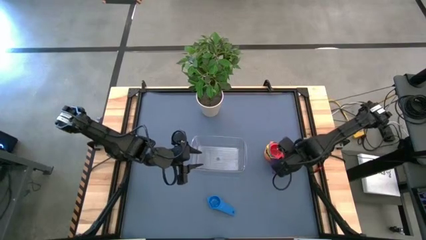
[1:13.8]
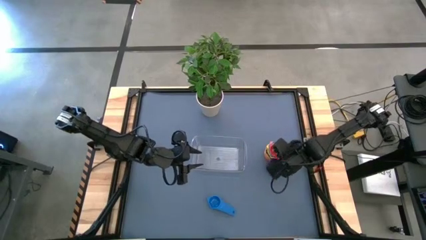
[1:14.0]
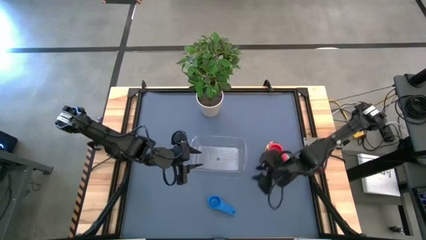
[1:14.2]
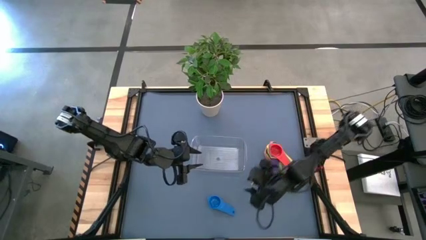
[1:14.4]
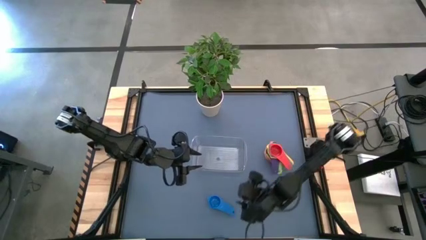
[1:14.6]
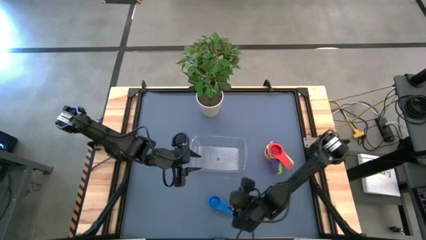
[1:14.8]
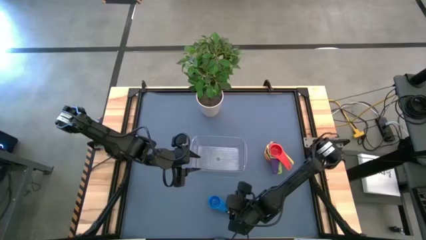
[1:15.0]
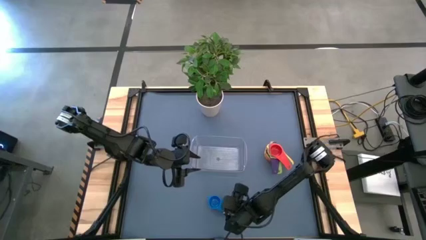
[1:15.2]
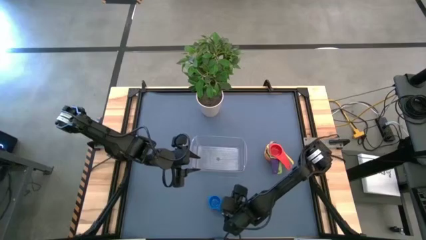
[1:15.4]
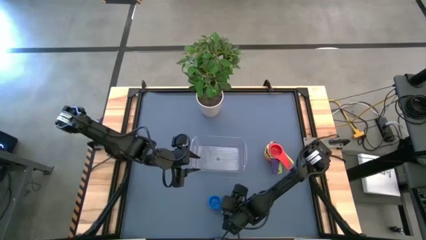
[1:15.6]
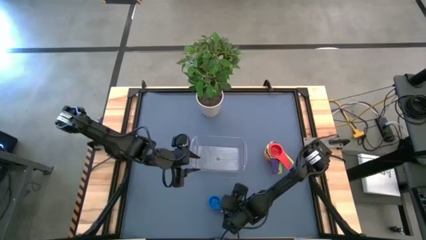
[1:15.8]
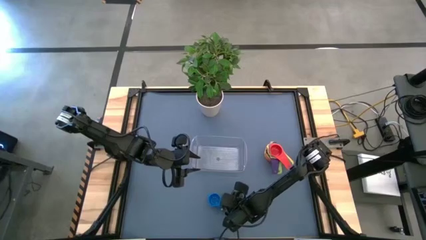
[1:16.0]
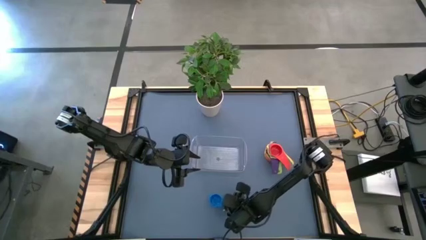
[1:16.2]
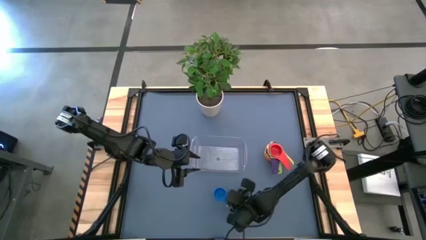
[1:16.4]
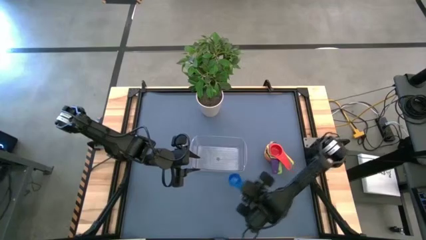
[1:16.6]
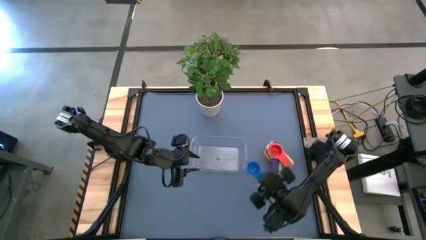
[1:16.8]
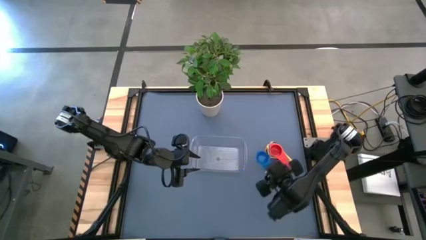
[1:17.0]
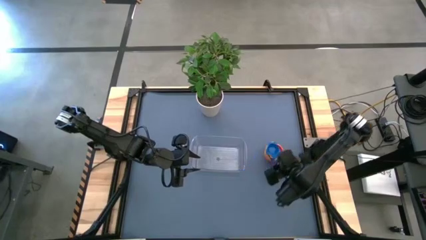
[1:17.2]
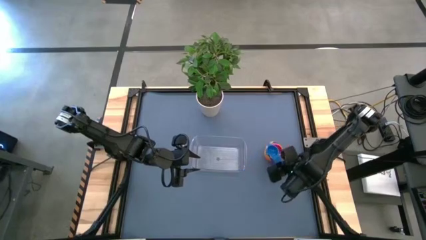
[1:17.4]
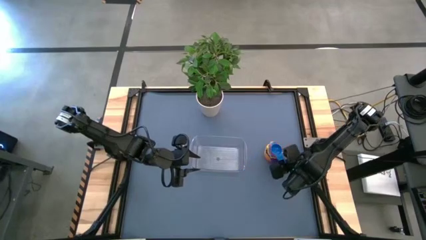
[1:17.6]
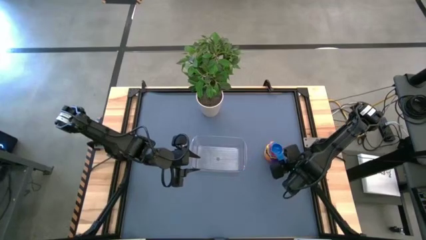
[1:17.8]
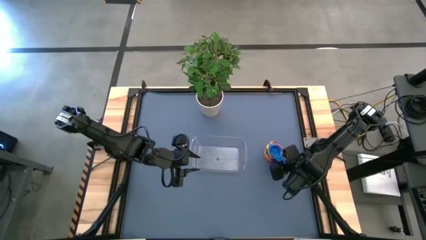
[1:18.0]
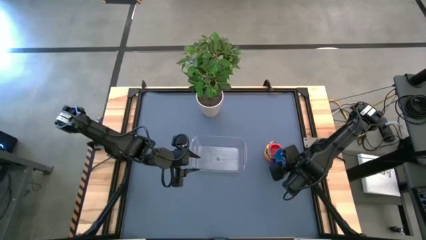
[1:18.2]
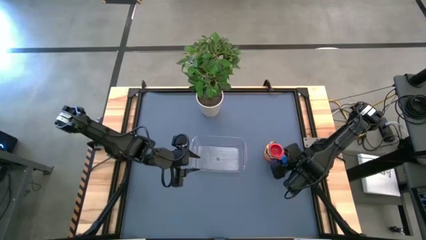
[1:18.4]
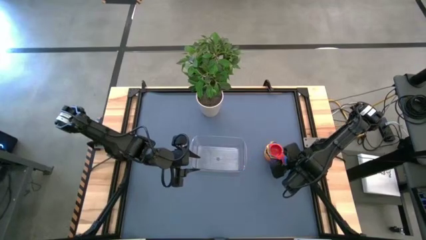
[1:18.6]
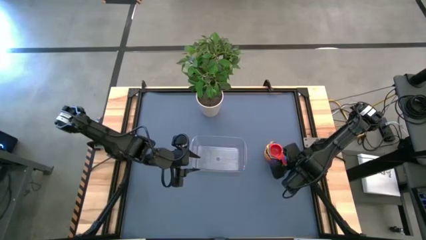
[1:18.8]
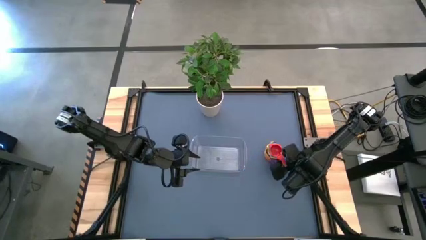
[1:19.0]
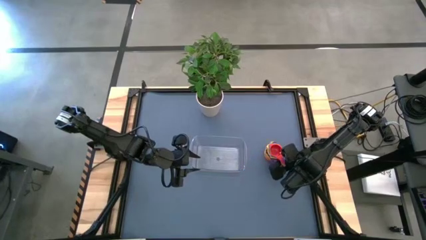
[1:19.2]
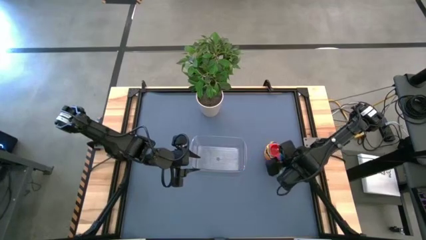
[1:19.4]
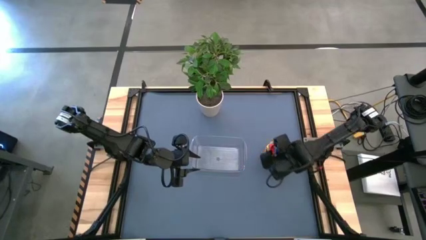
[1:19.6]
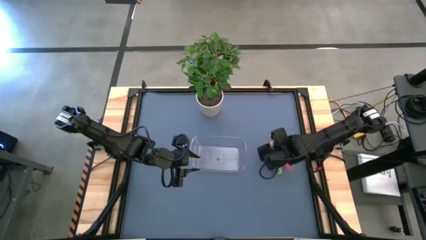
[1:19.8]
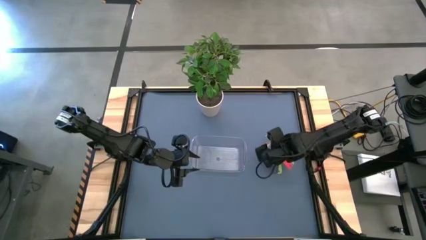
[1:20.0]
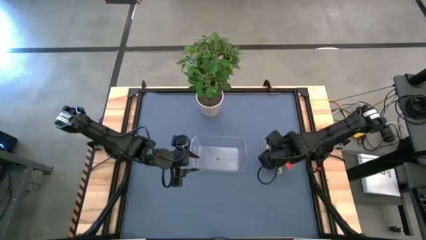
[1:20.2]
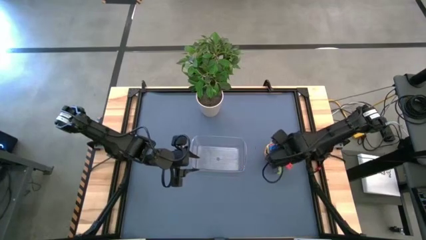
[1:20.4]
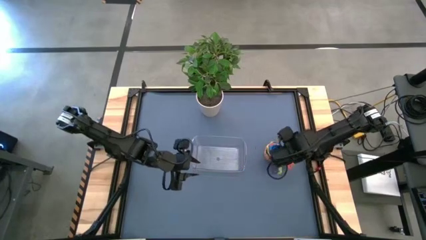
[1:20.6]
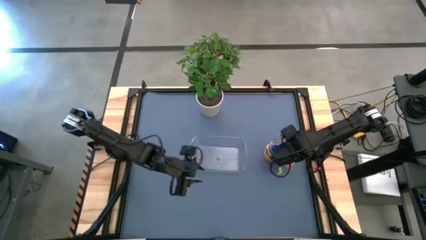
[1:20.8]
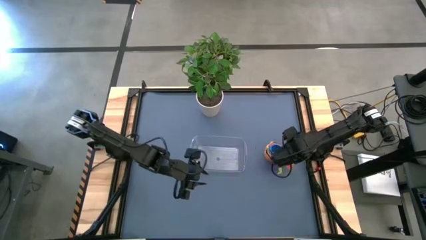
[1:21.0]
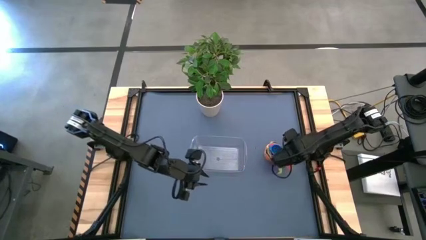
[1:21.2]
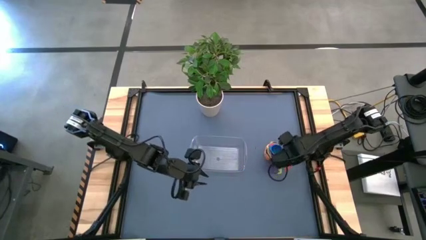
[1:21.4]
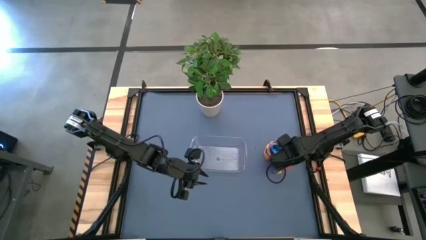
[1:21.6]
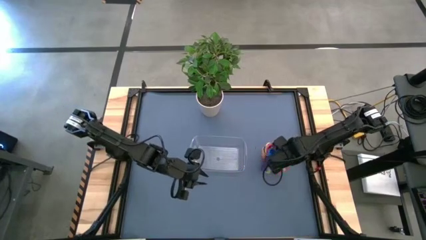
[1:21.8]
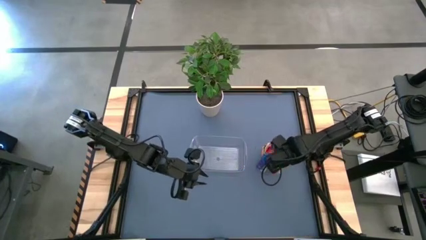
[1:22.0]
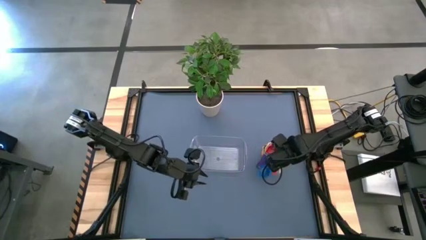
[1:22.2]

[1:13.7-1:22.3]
Task: Nest measuring cups in basket
Stack the blue measuring cup on top of the red measuring cup

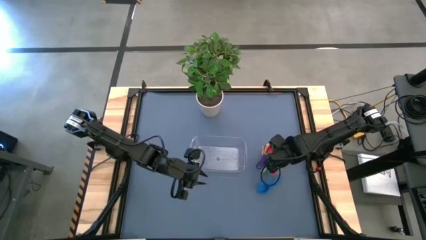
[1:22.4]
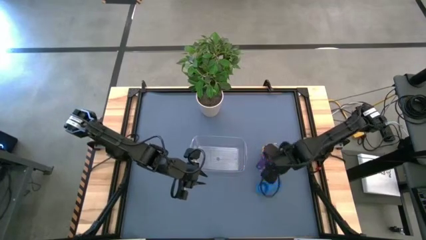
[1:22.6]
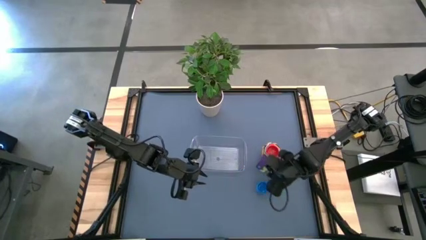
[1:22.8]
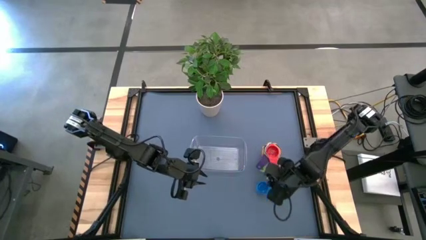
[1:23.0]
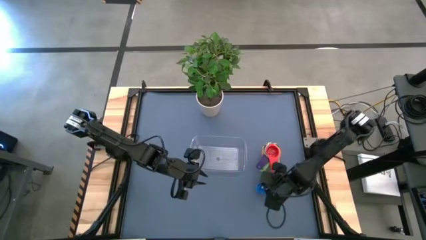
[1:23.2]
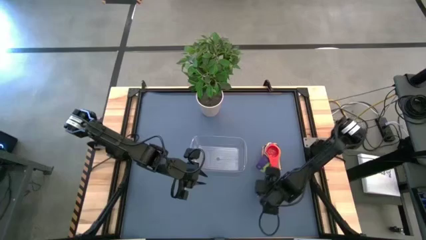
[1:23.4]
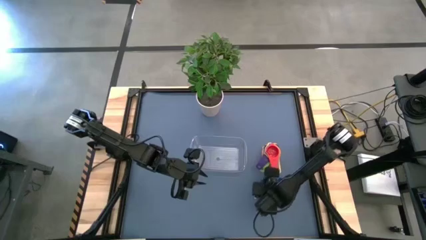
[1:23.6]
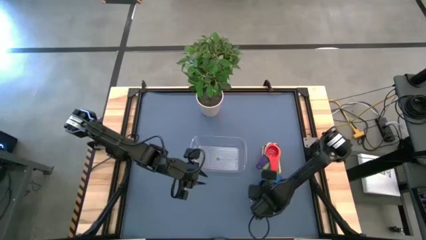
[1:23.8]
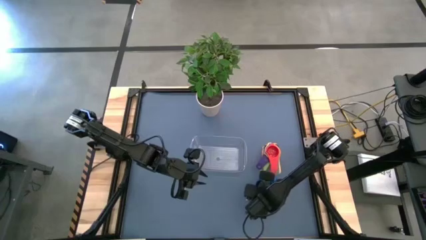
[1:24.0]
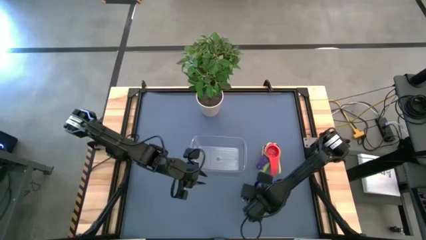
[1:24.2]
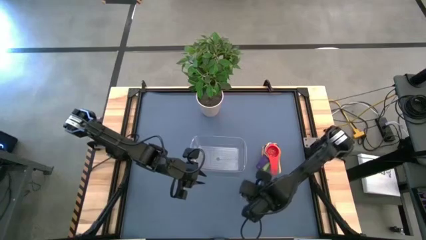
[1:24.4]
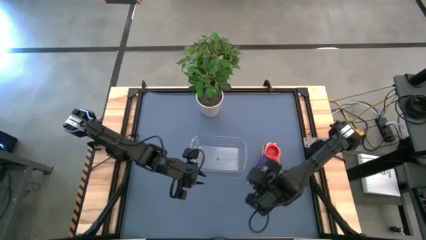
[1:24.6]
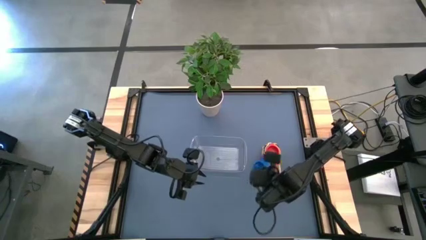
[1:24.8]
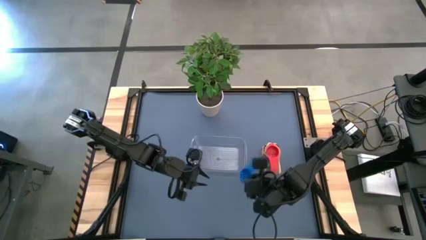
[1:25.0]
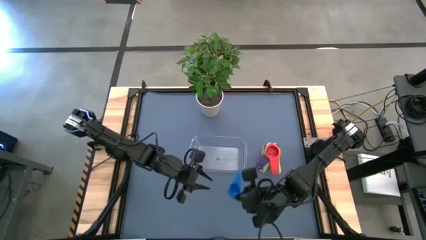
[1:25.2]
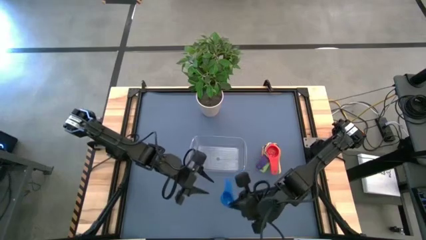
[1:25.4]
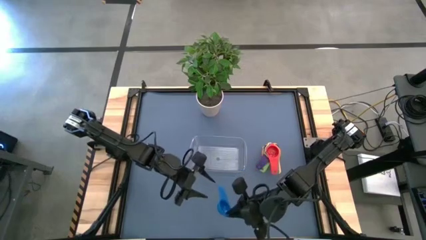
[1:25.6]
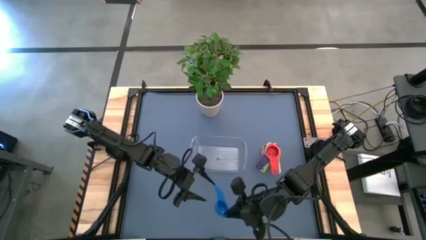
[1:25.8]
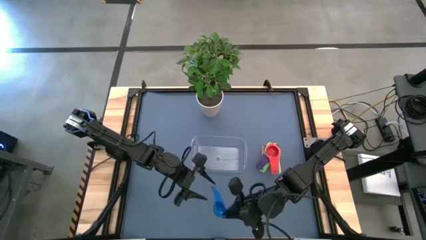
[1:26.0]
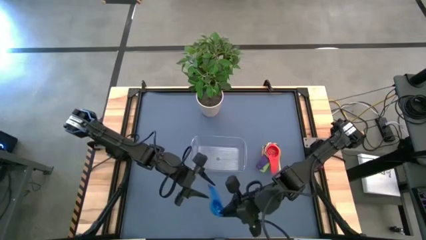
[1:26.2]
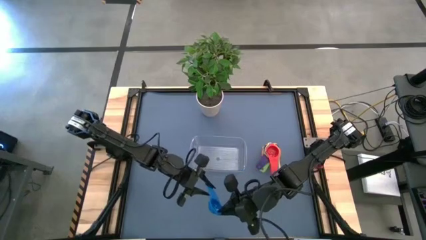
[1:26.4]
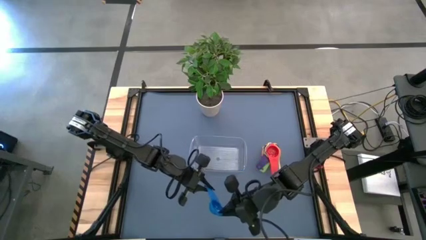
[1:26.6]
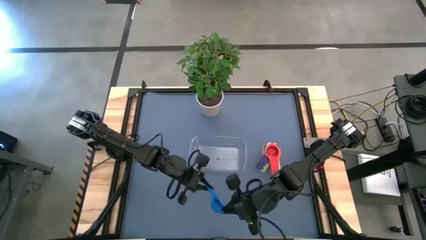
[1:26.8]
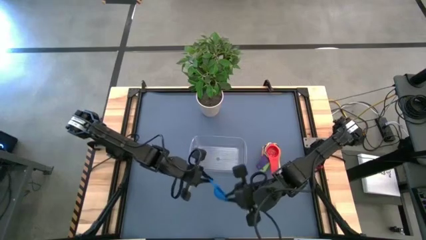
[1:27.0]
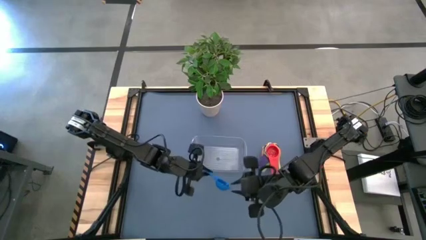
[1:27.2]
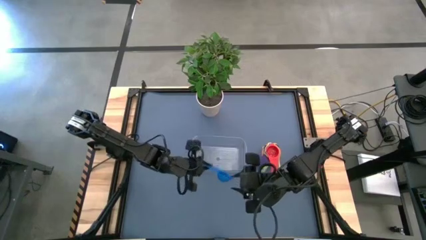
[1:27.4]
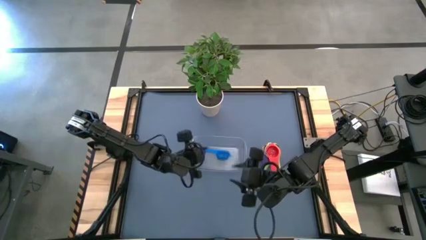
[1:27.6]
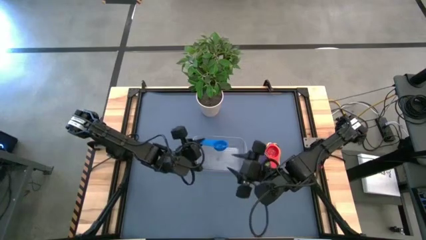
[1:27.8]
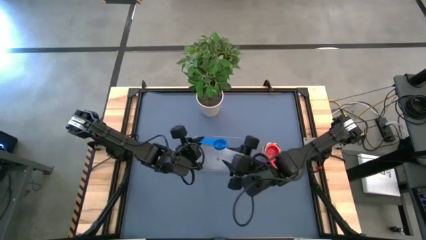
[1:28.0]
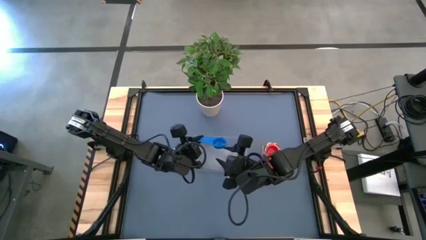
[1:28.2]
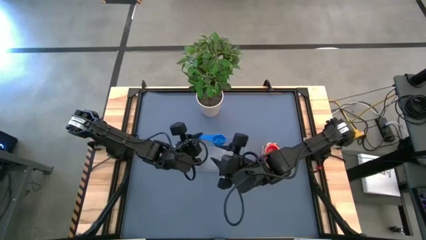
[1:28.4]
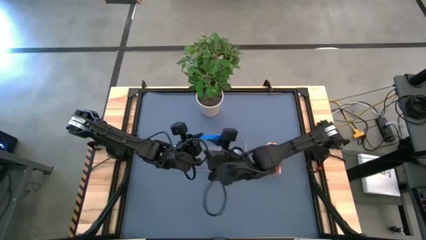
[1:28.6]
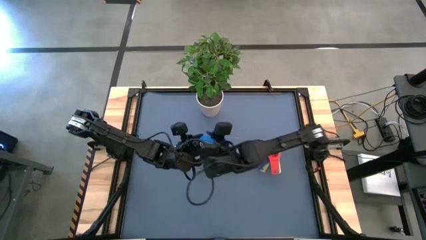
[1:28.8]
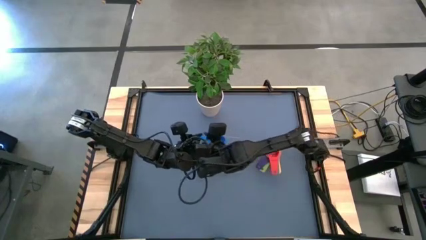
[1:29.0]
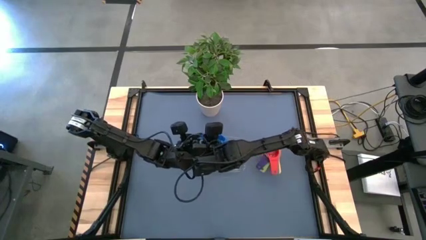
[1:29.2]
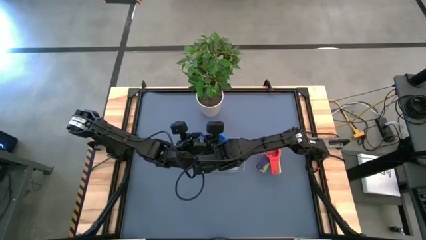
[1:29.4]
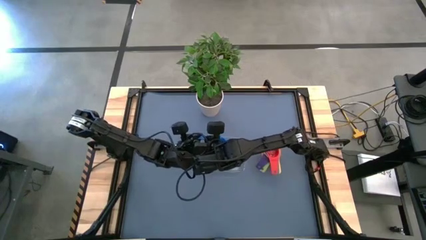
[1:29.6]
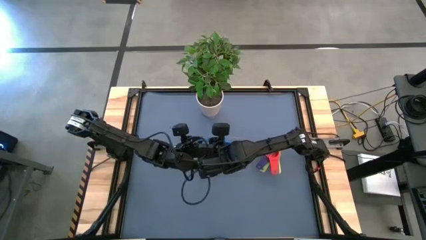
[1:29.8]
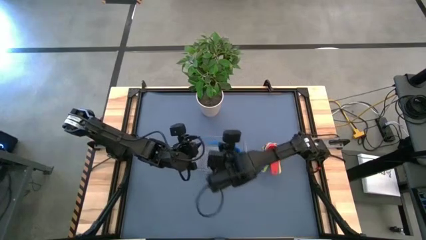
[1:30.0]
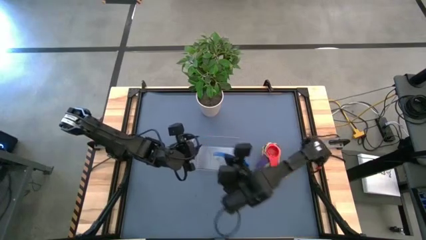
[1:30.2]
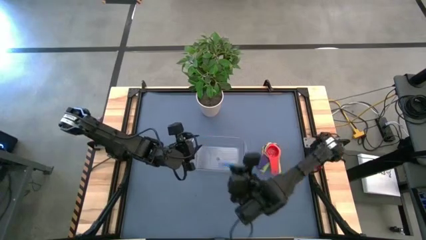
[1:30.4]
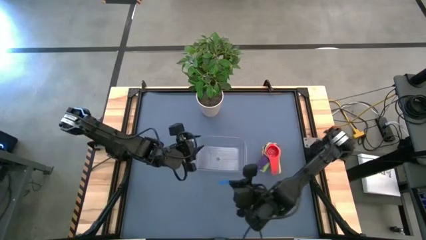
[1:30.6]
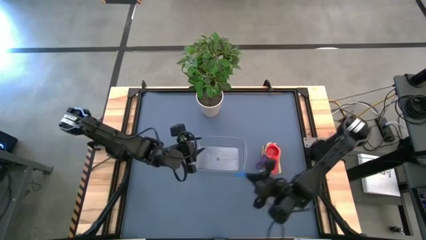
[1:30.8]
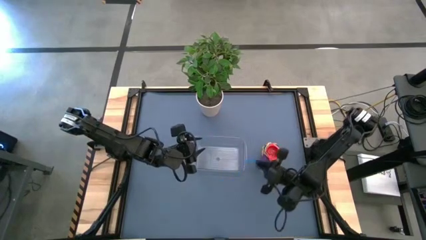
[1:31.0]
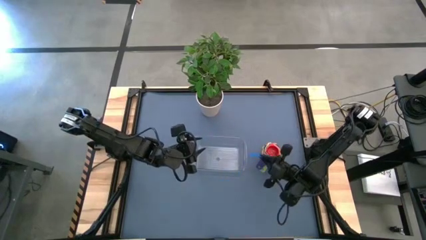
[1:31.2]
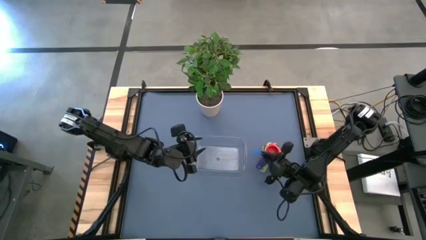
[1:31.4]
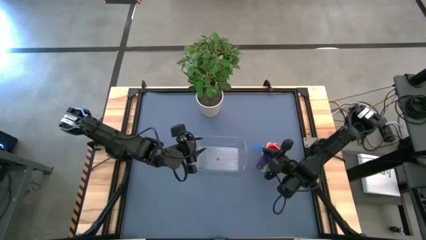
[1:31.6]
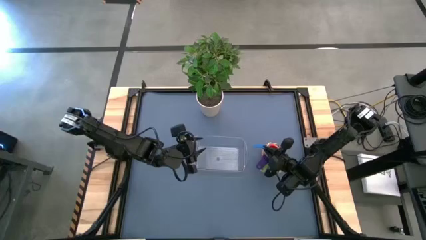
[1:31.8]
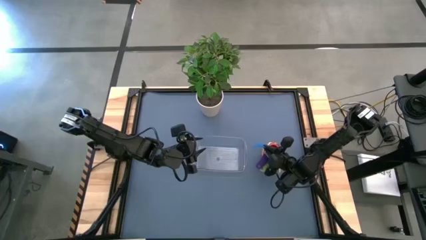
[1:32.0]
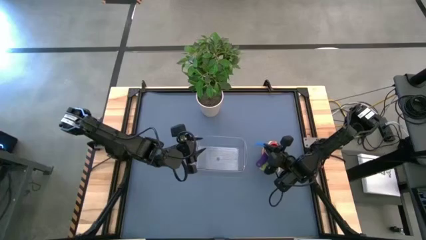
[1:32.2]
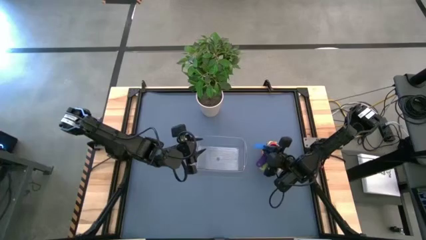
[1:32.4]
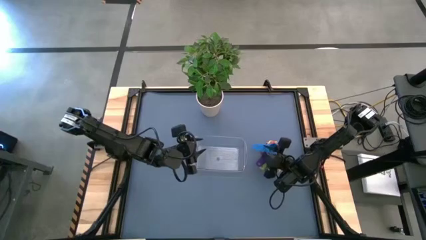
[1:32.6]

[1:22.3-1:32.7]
Stack the blue measuring cup on top of the red measuring cup
